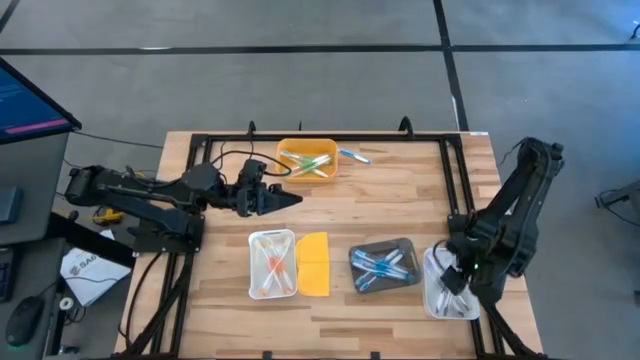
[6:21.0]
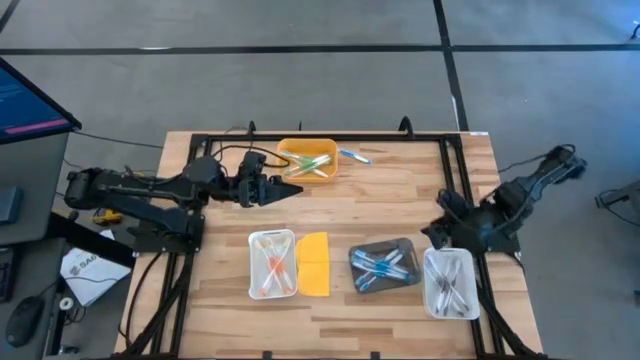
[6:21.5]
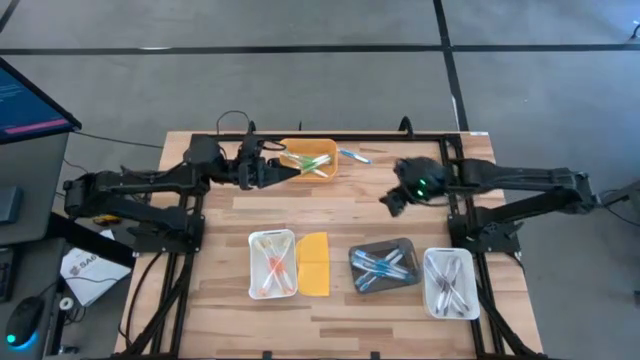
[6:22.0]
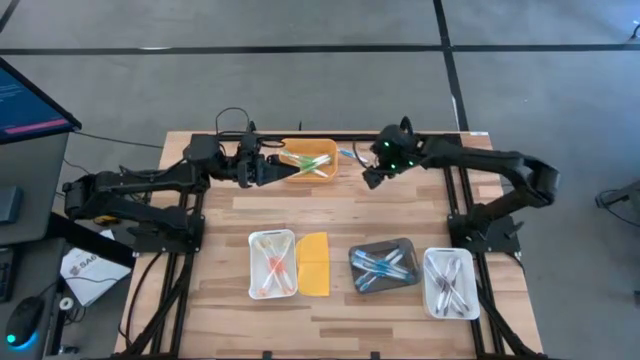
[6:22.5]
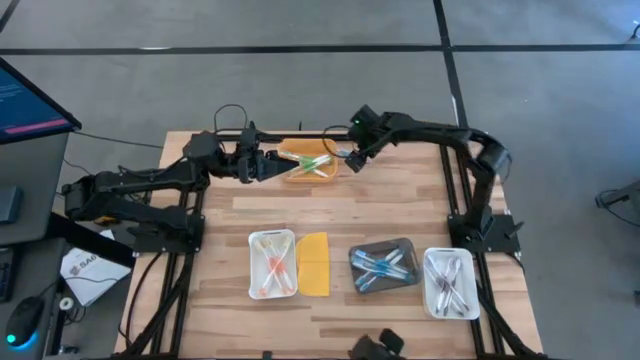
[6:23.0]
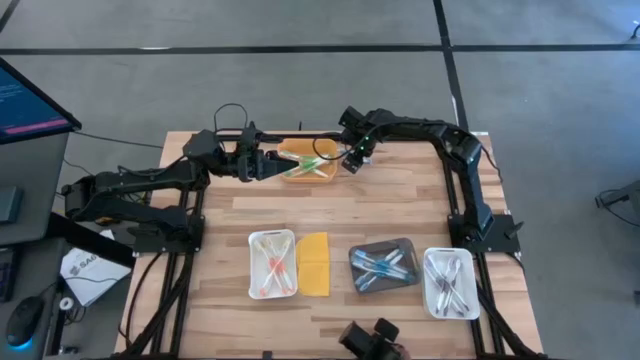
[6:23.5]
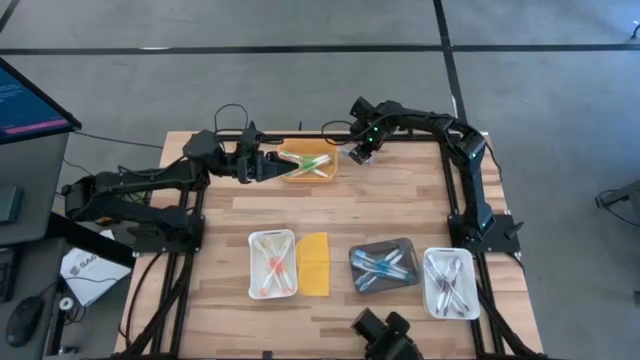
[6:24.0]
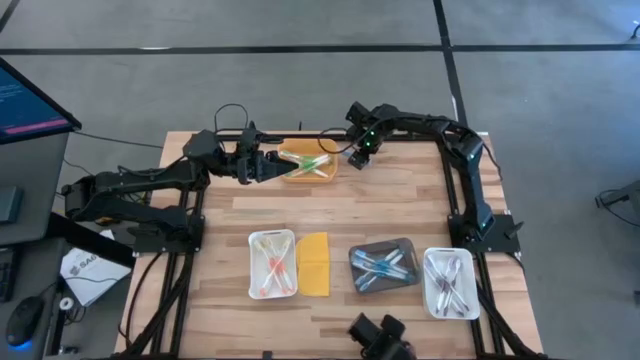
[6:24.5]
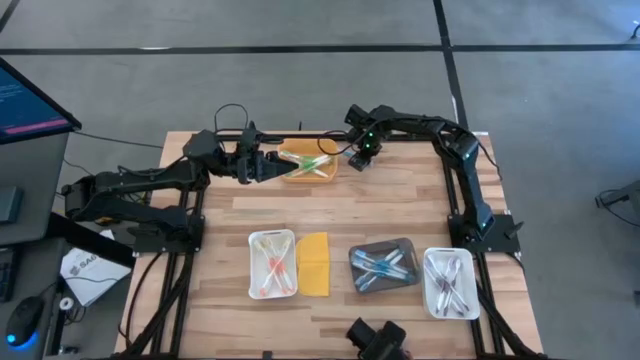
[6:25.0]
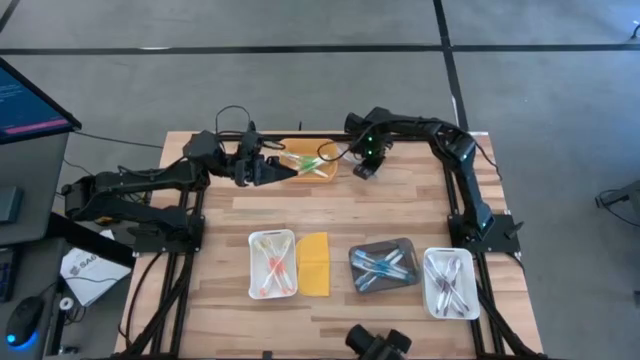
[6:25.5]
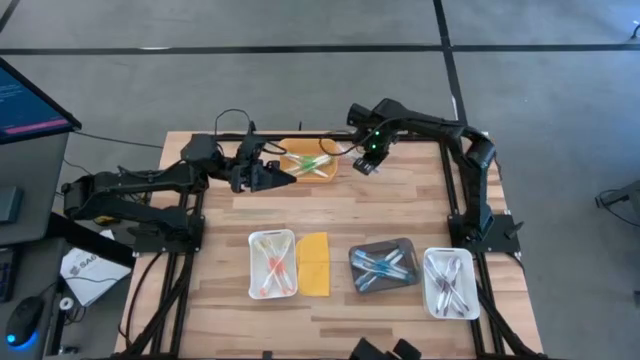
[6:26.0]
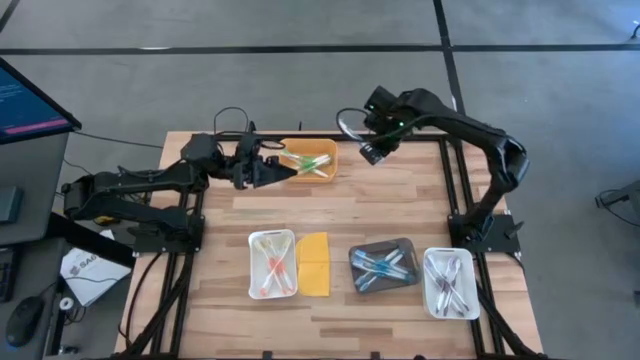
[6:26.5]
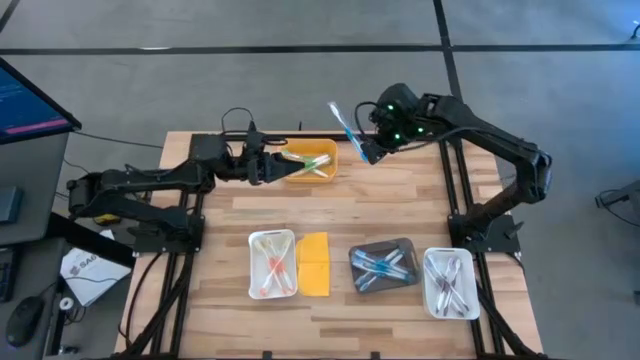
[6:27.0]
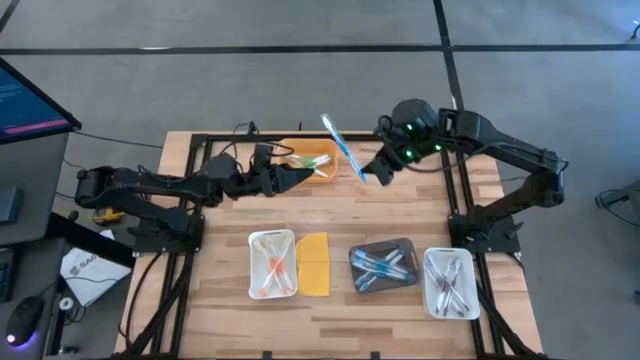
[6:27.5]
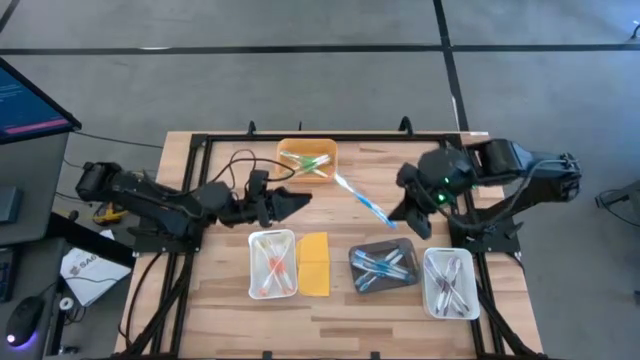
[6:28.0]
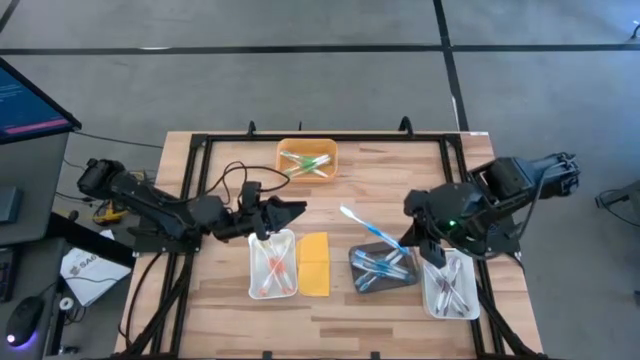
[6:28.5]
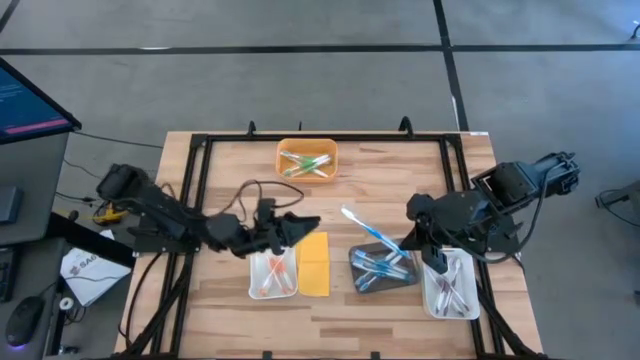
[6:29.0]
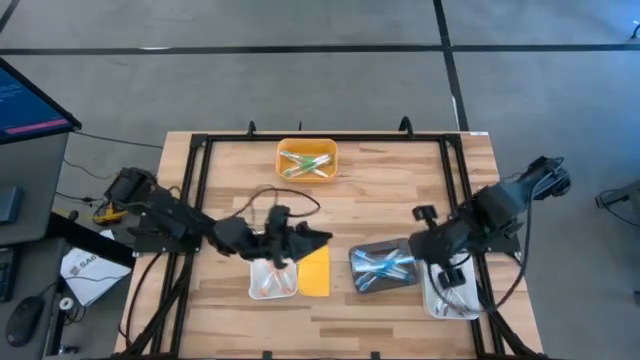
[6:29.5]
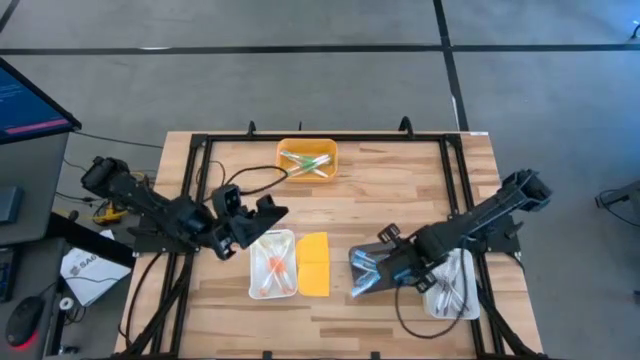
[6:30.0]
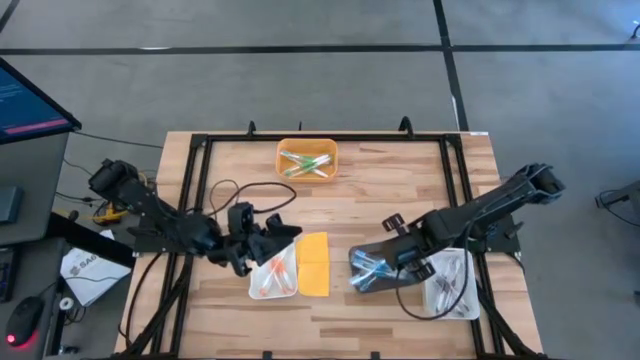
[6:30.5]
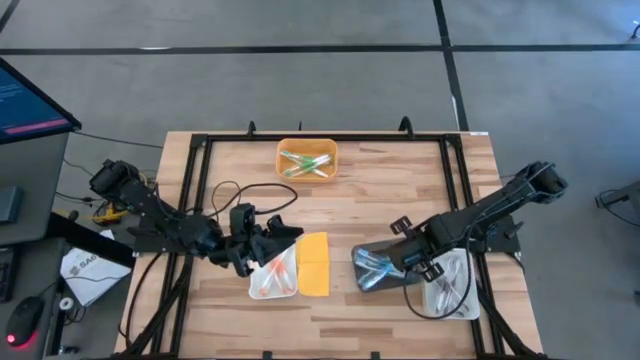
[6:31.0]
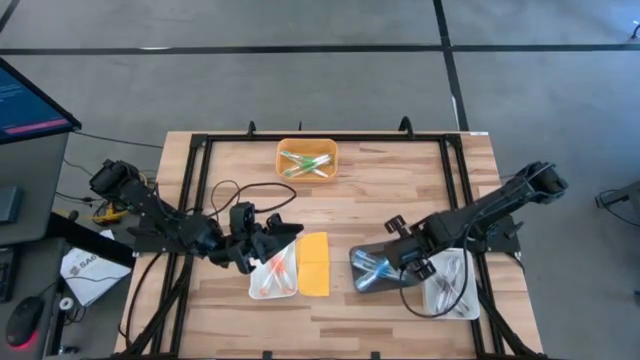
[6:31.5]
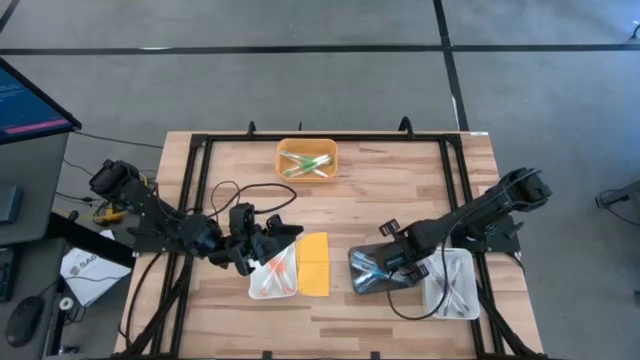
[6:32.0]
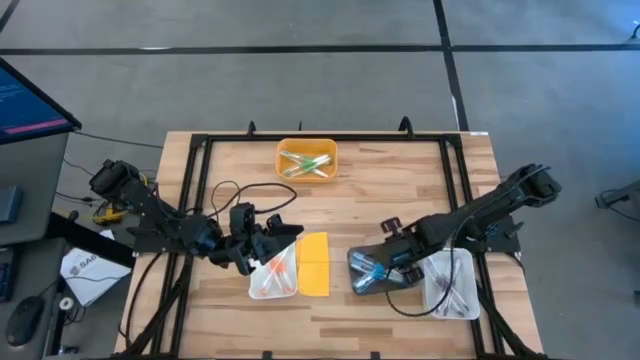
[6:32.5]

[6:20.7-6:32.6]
Task: Pick & Place Toothbrushes
Put the blue toothbrush into the black bin

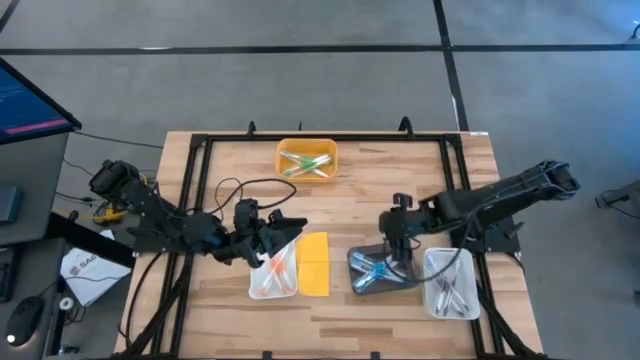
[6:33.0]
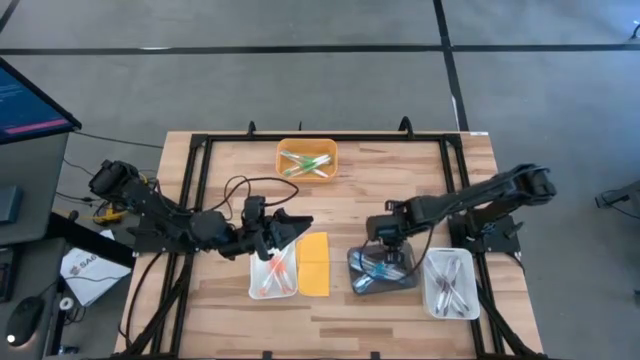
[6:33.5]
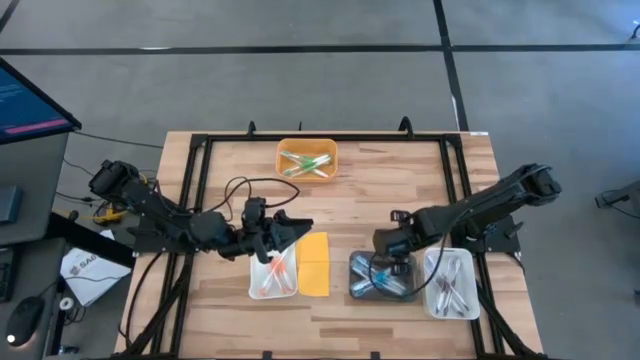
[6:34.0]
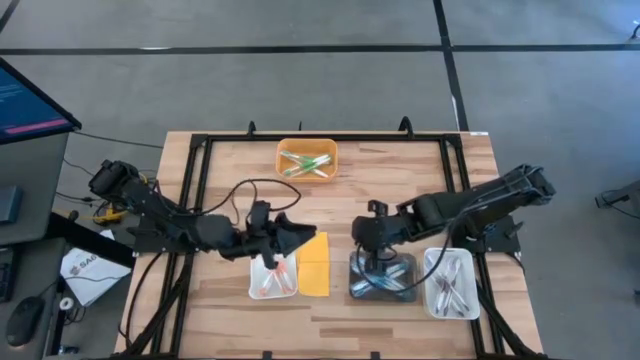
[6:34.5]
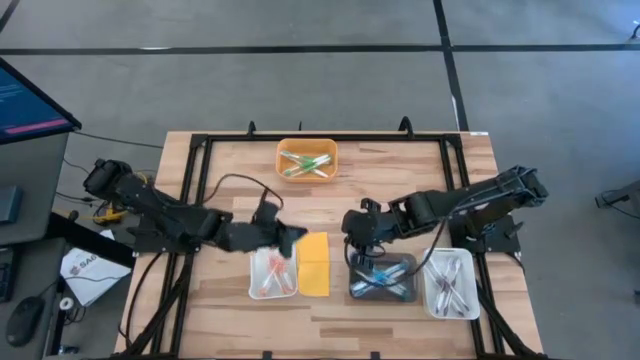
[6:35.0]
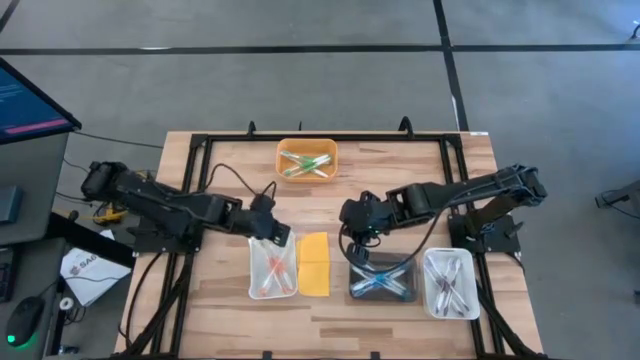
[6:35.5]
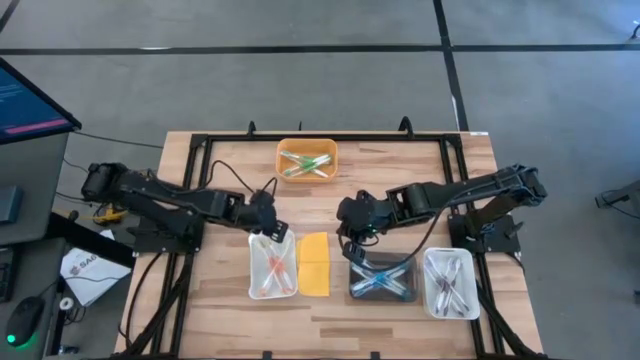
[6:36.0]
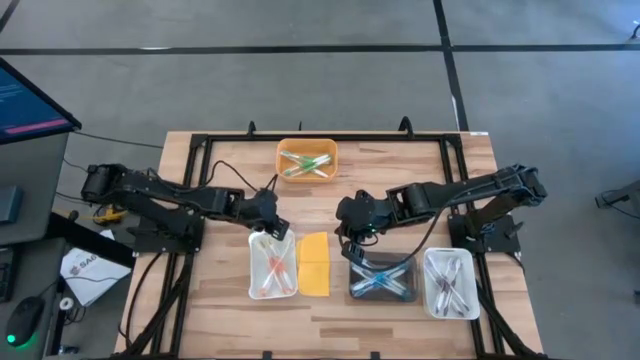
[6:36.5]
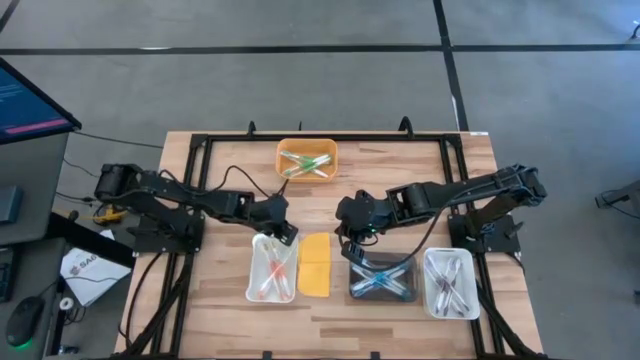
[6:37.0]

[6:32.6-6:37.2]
Adjust the bins

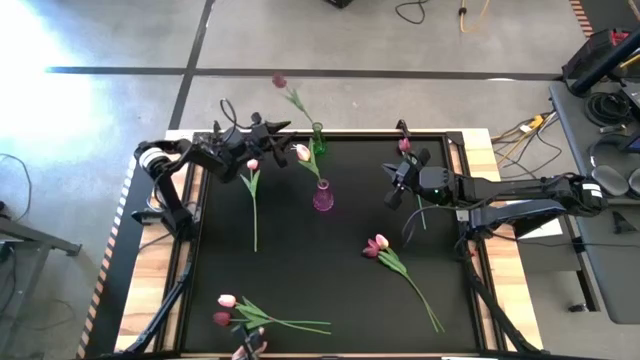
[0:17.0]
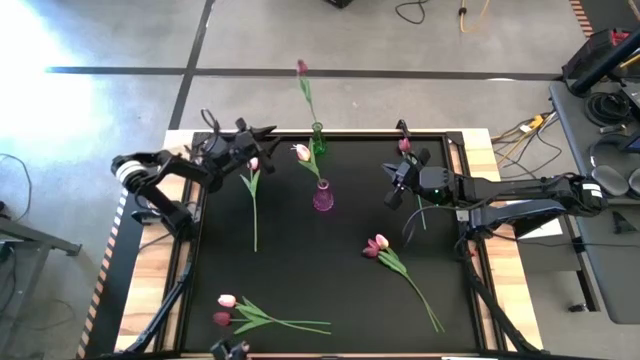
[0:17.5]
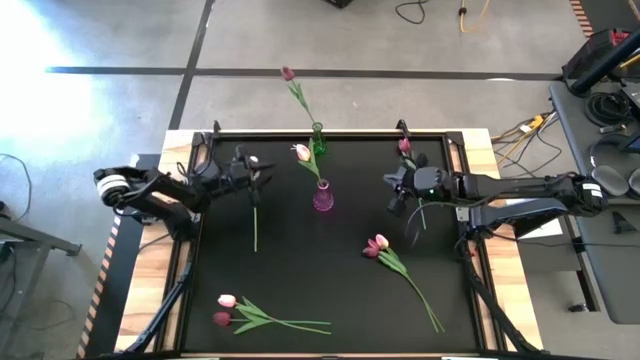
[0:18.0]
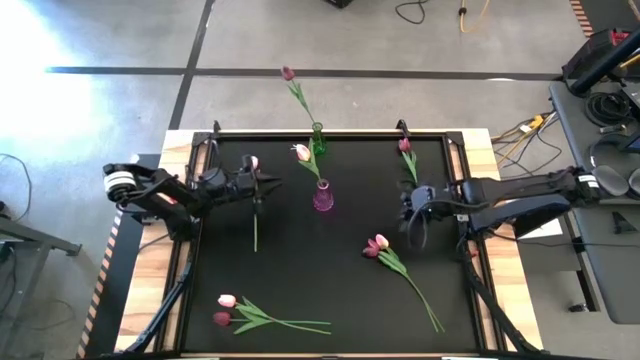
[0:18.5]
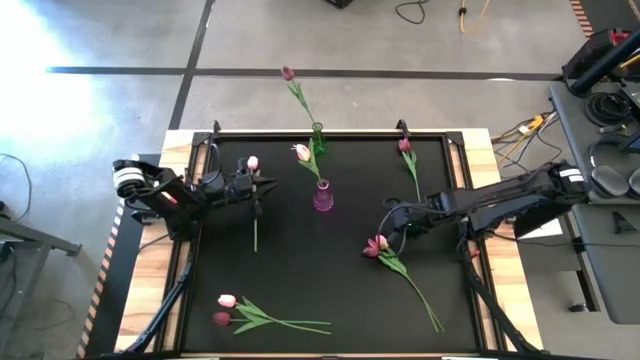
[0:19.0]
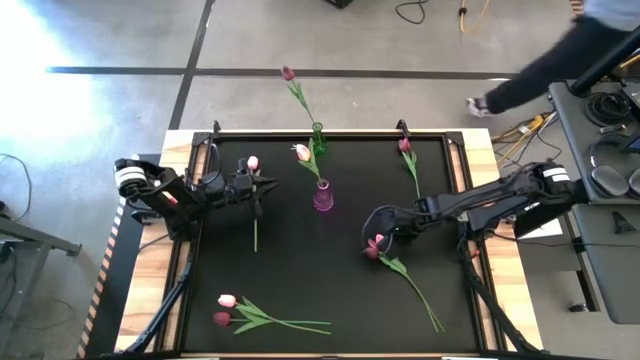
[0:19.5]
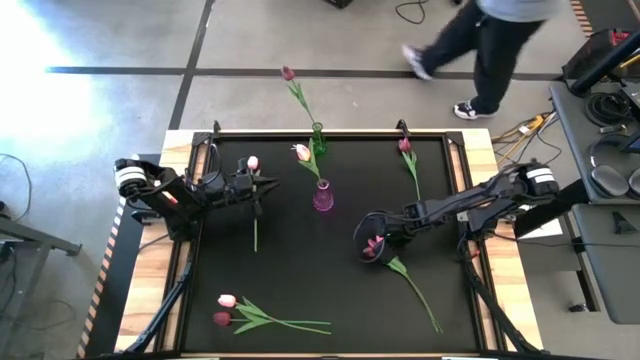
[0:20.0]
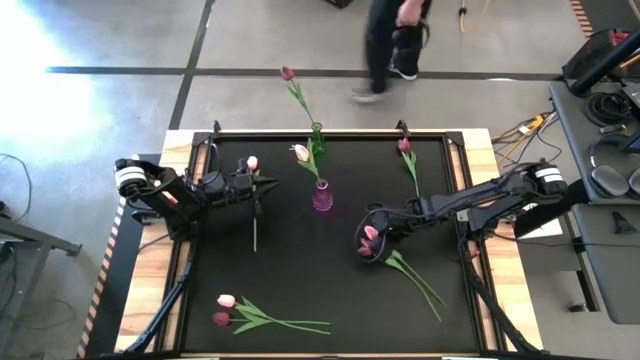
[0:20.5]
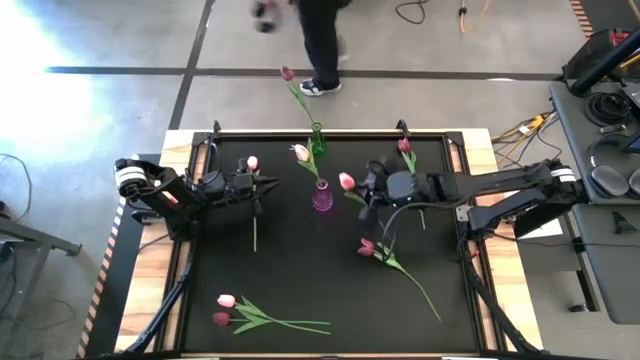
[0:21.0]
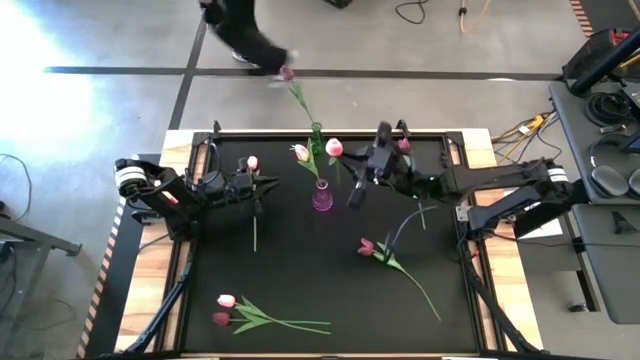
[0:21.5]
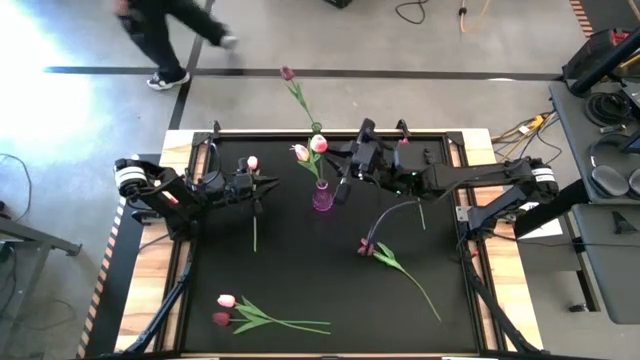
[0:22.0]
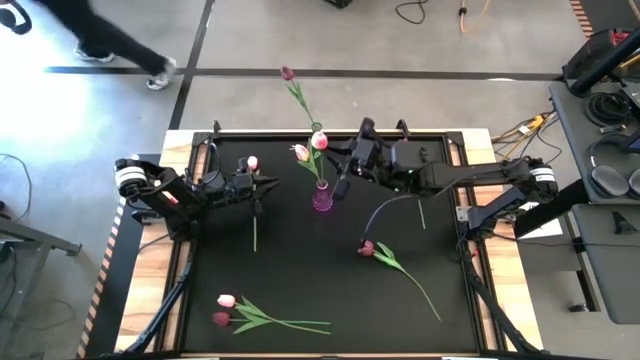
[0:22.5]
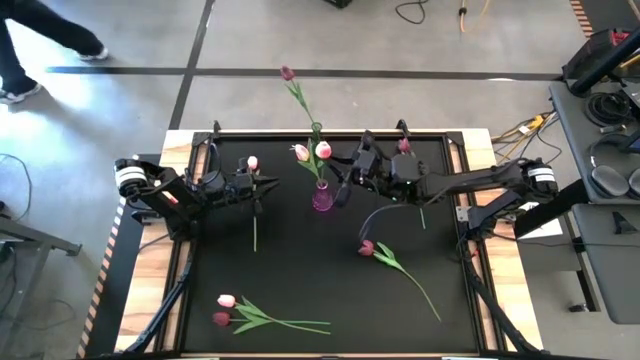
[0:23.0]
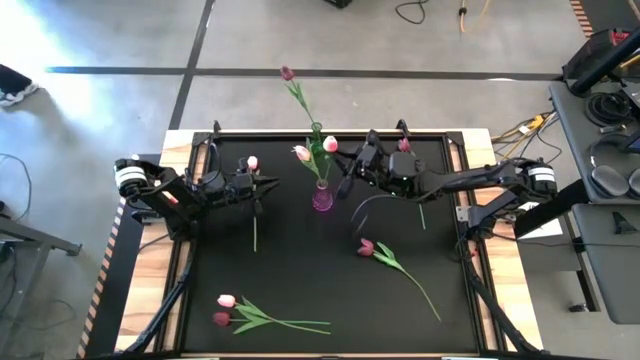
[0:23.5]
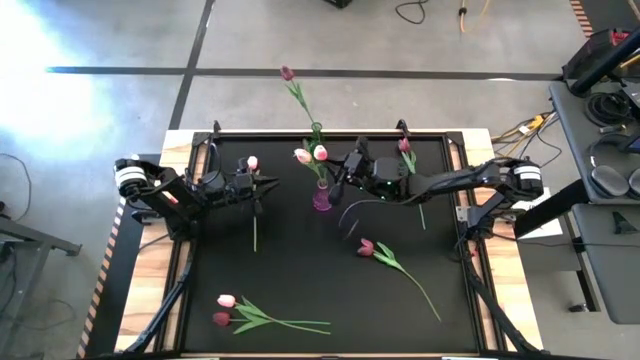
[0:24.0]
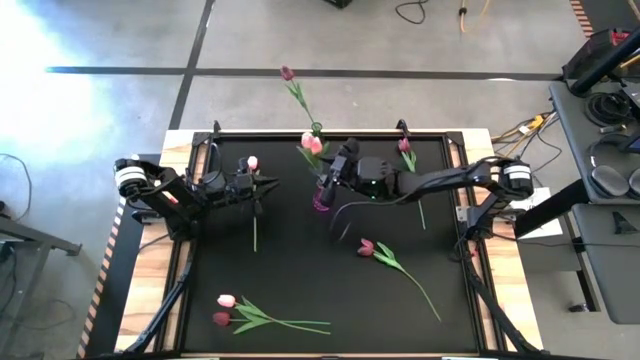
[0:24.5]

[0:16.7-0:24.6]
Task: Sort flowers into vase by color
Put the purple flower into the purple vase
